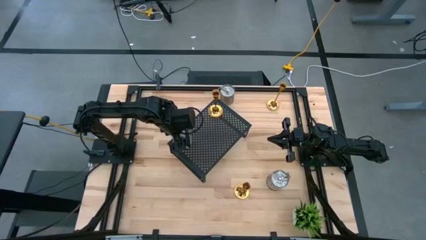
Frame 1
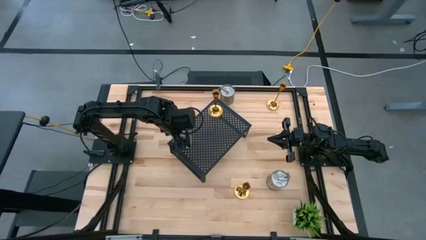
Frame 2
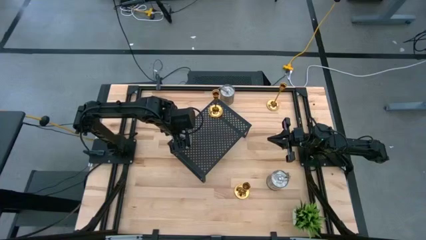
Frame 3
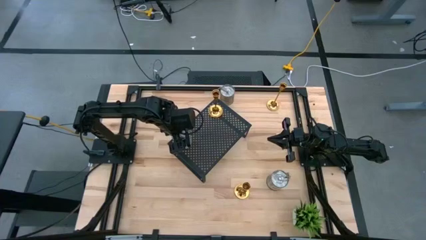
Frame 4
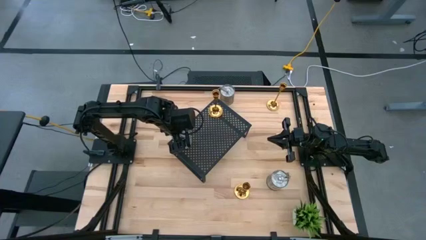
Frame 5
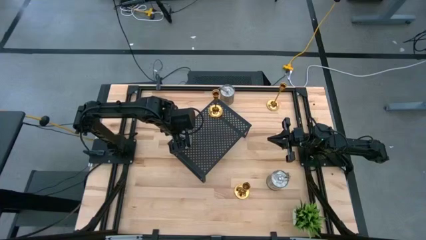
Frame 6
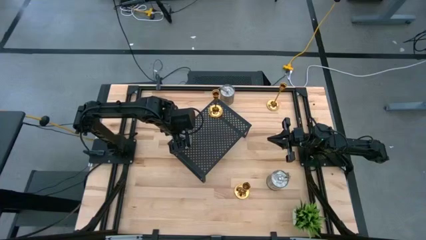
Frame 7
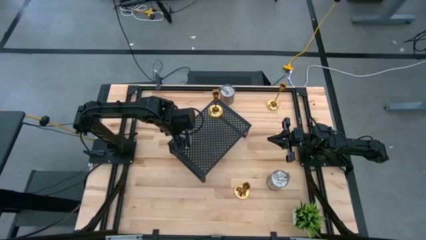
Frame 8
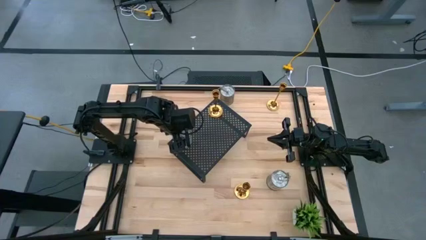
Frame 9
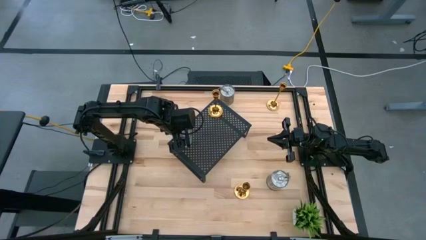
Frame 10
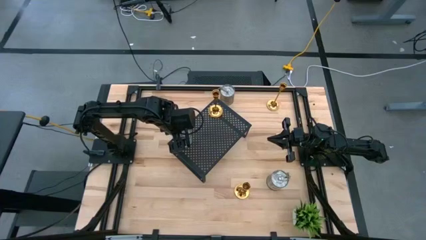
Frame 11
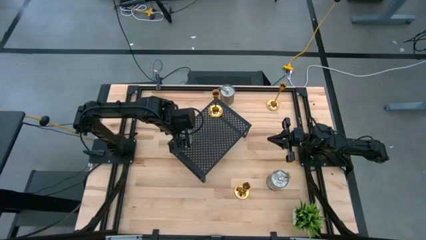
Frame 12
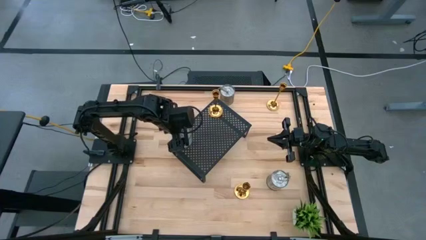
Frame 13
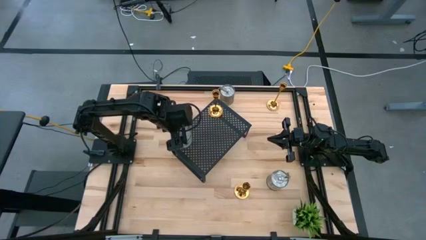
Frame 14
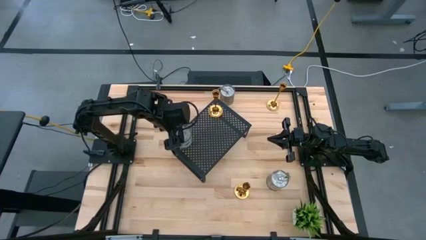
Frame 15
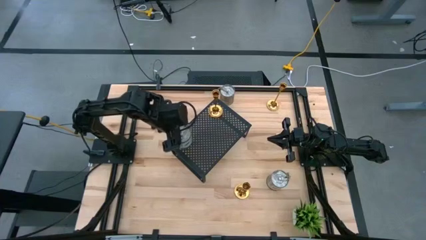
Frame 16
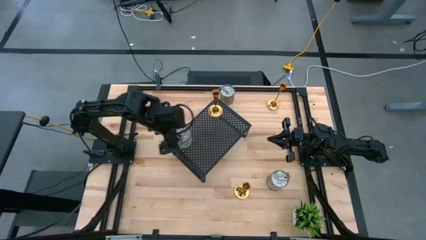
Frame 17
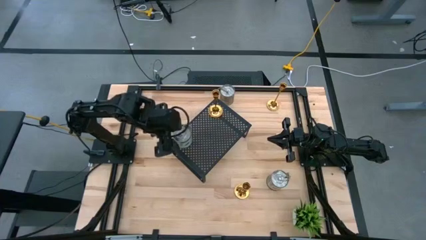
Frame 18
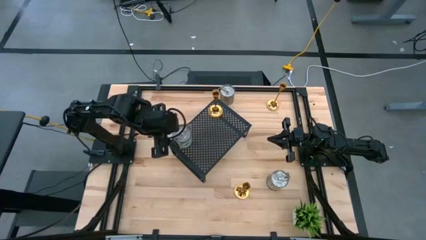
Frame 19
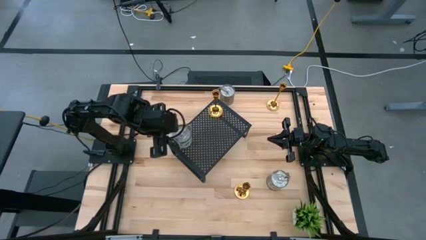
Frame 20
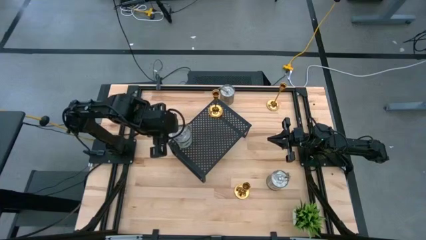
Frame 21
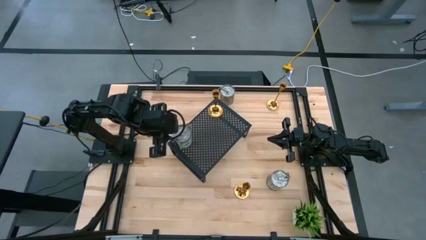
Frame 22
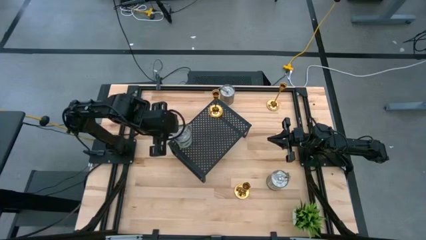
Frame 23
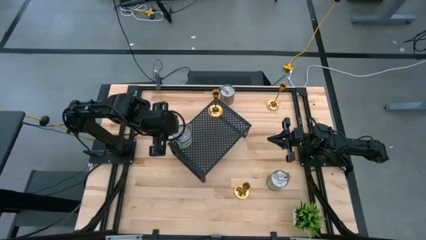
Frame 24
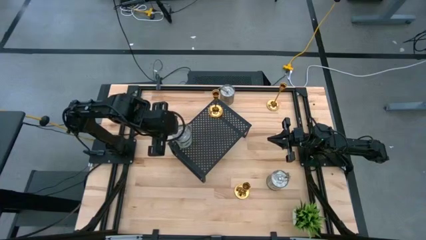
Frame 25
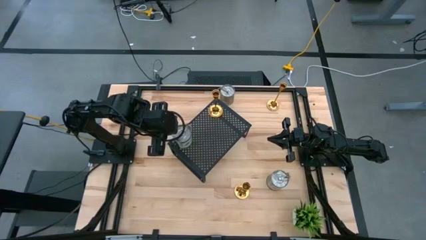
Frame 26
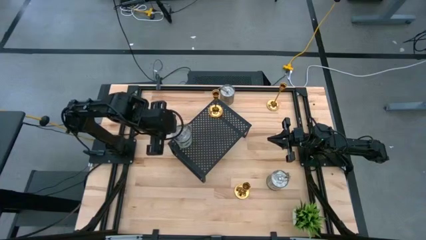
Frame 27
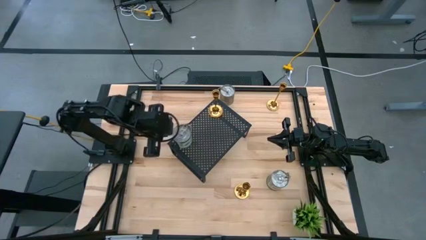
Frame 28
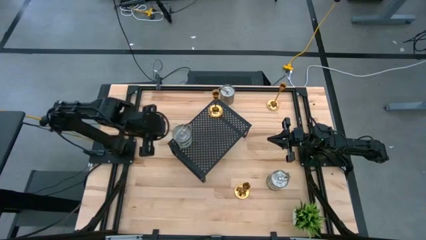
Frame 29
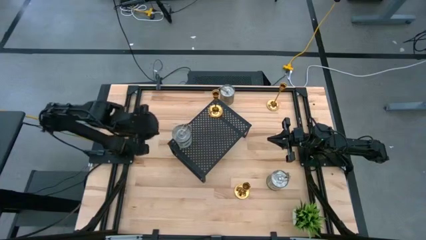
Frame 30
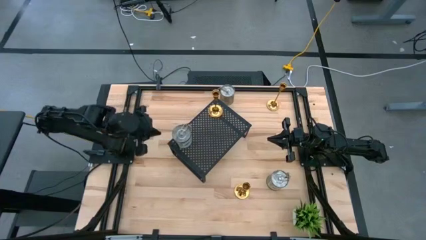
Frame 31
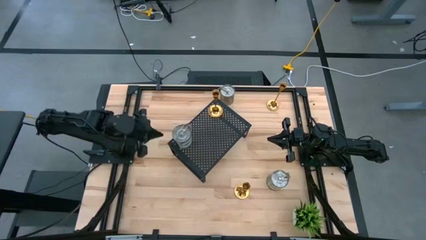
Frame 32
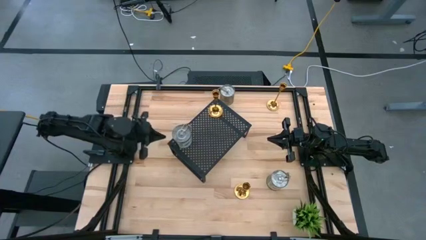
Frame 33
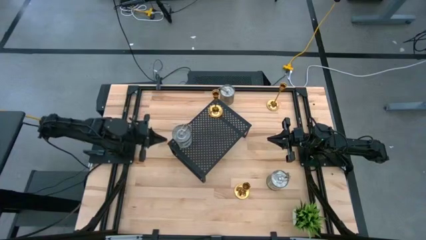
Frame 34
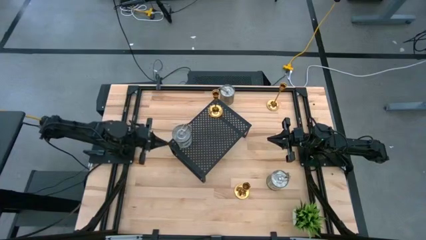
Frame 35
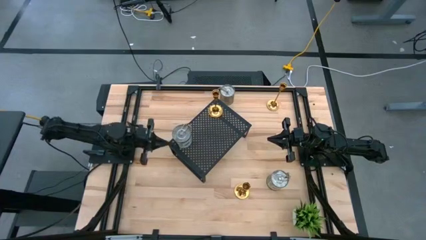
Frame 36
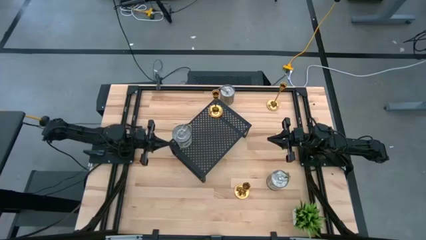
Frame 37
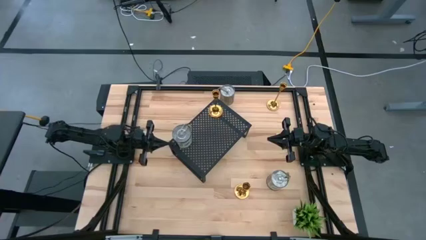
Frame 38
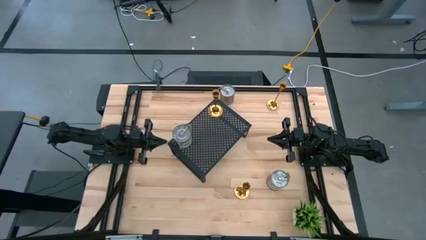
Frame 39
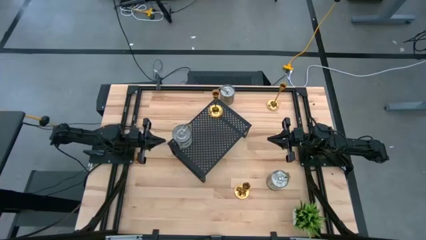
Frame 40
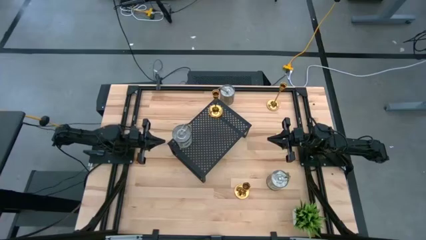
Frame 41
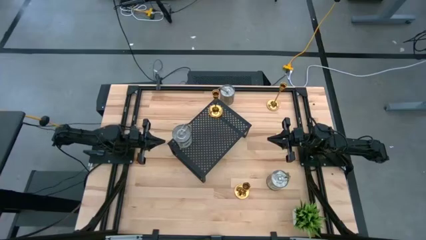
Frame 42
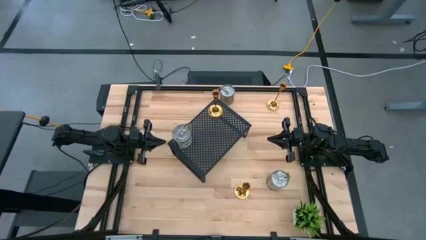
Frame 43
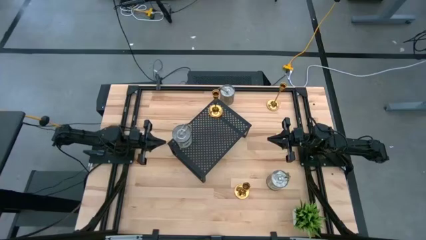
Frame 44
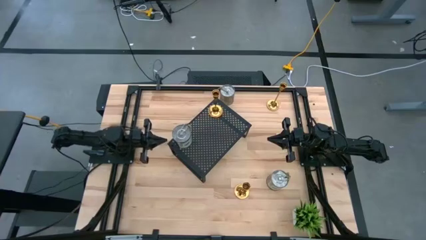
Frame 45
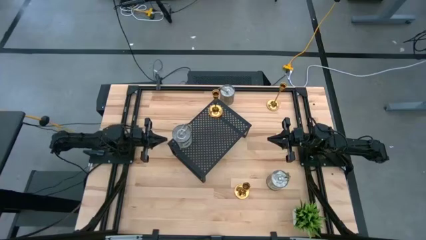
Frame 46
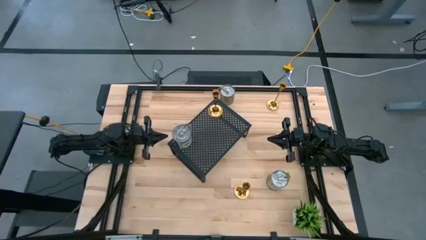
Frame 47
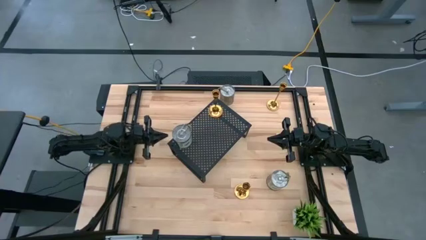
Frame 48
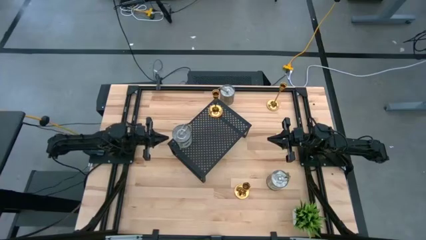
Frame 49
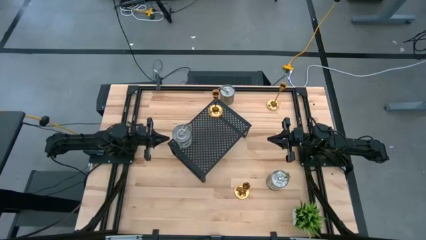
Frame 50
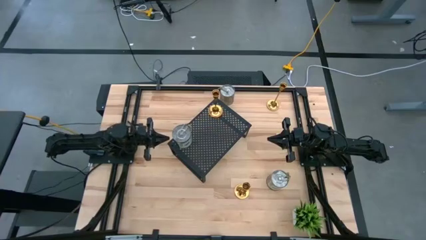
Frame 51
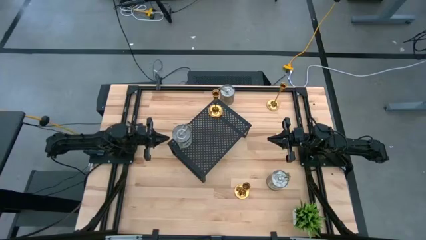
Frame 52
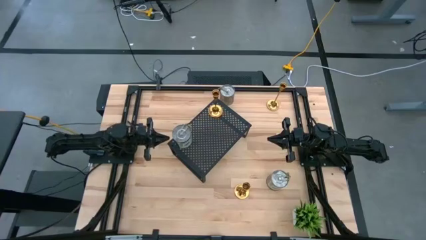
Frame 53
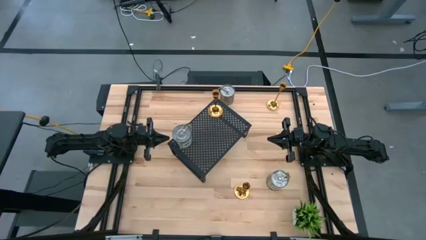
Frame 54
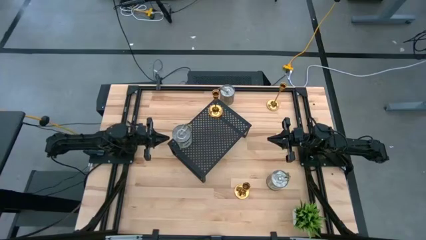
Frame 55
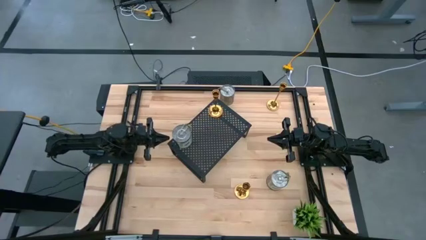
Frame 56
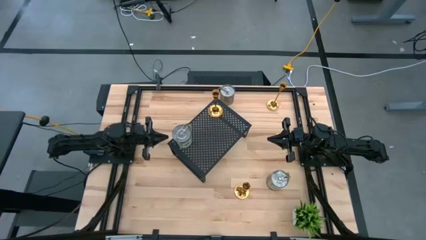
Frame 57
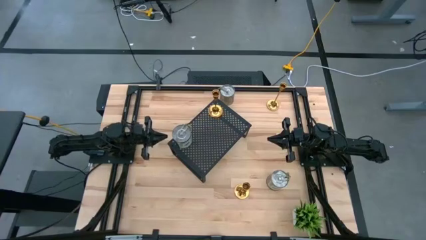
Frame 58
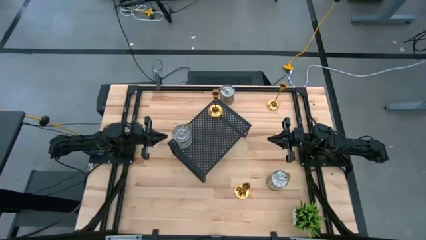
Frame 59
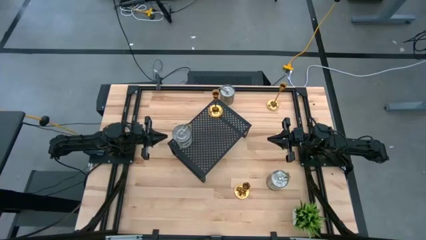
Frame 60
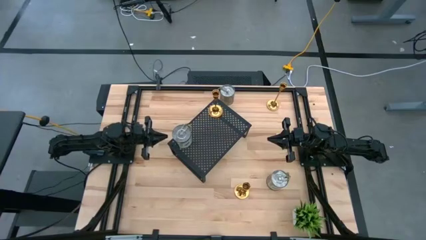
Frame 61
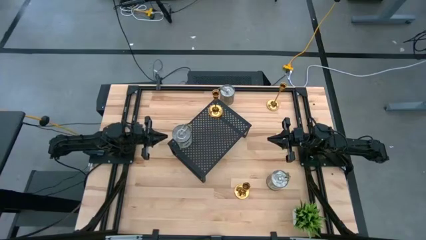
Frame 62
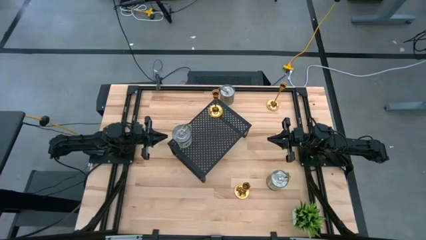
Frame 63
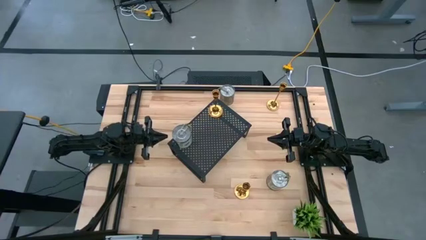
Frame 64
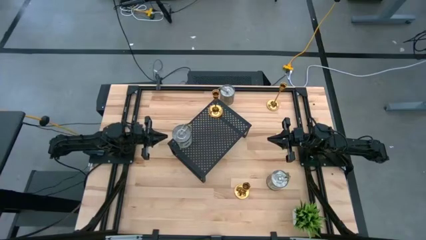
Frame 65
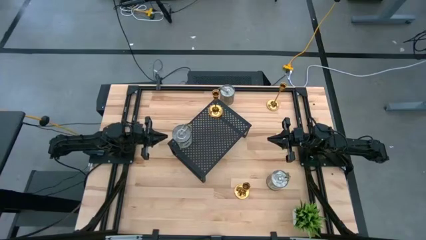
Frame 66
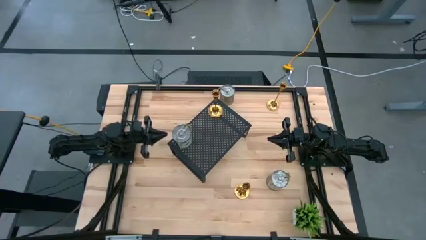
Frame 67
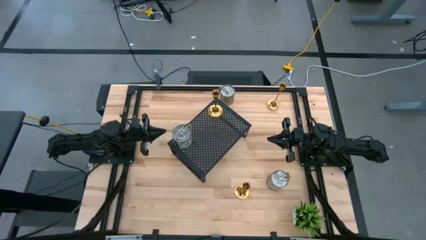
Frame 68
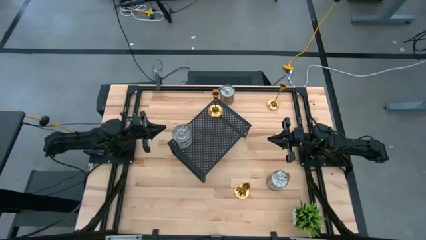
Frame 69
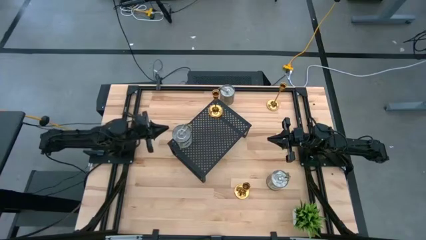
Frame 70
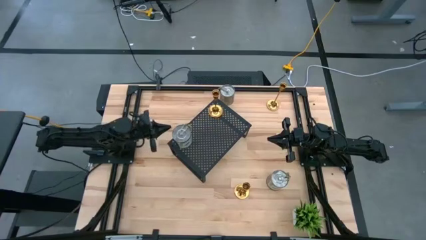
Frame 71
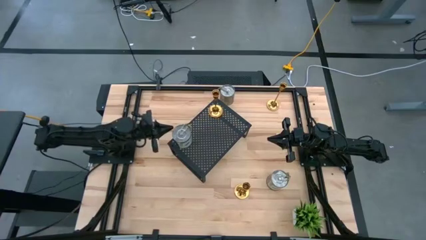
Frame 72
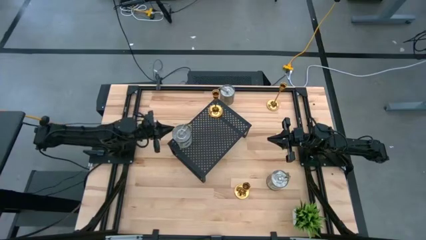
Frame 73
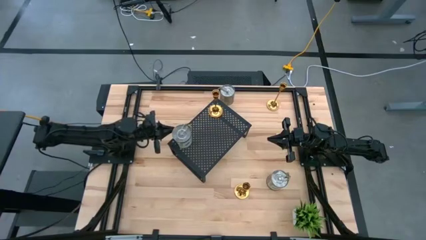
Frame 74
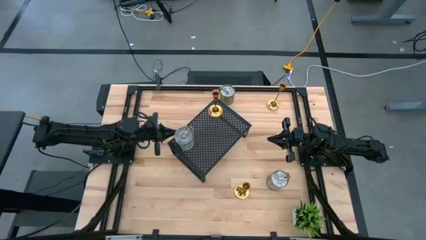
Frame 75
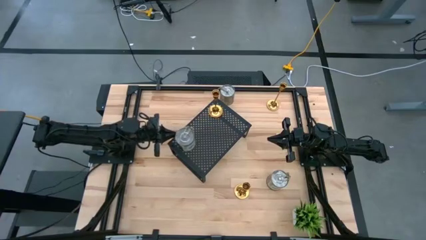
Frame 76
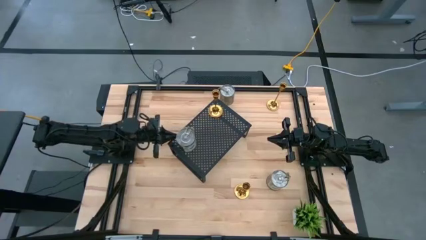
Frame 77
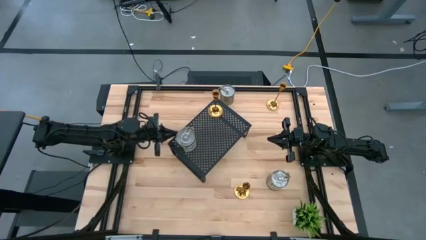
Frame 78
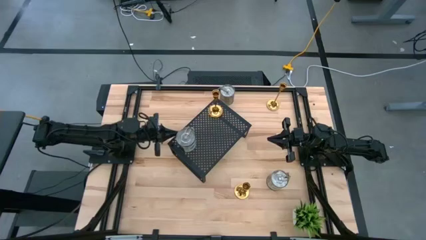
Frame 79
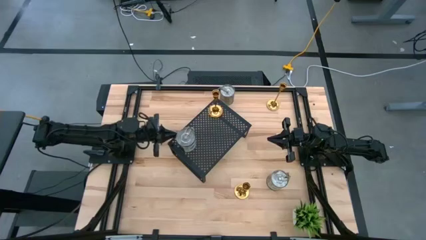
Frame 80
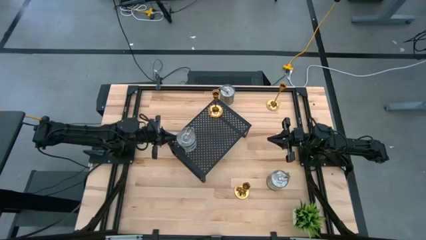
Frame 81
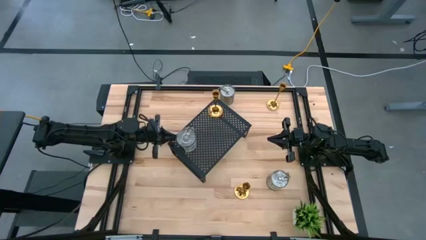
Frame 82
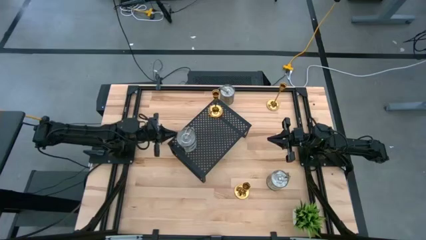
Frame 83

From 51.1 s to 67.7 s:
Task: Pick & Place candle stick holders
Put the bottom left silver scented candle on the shelf
